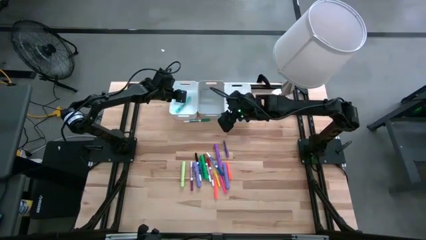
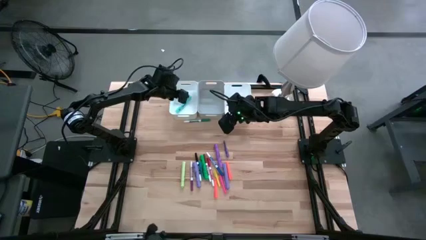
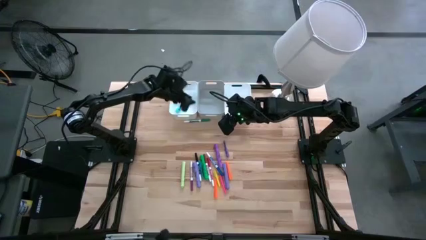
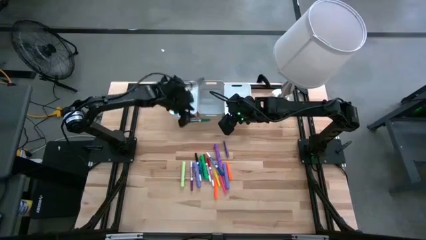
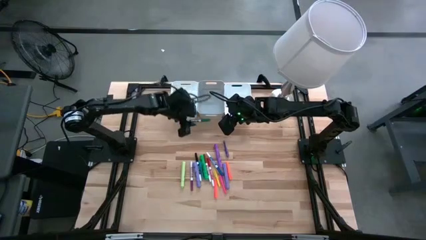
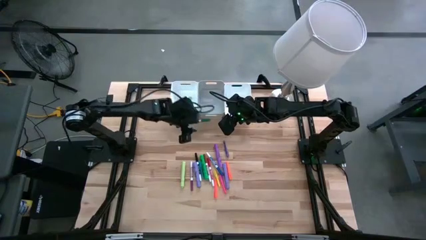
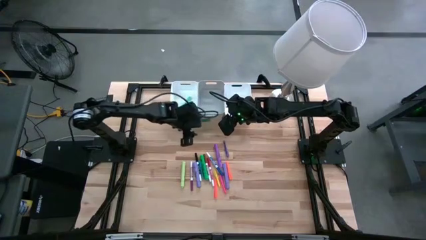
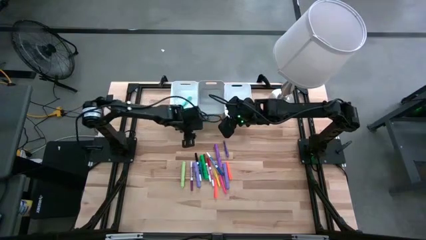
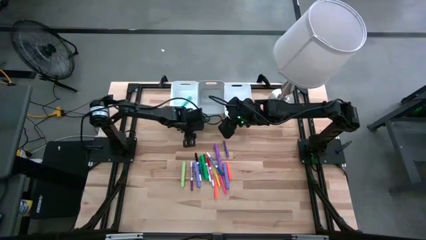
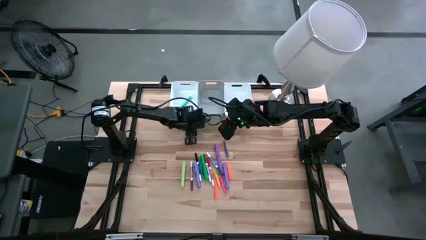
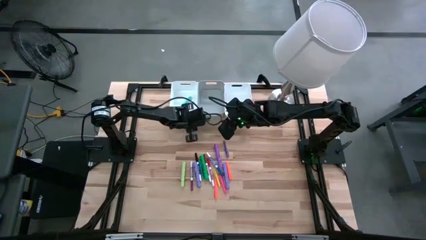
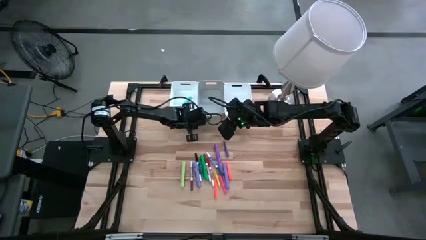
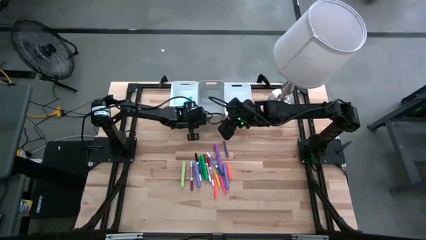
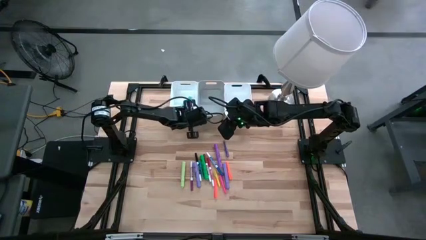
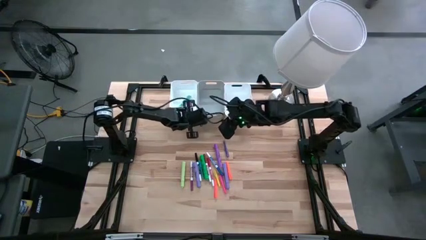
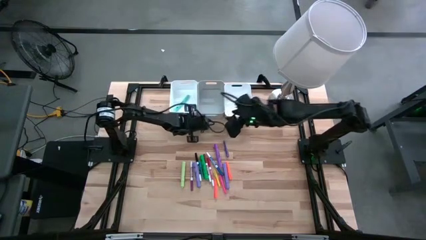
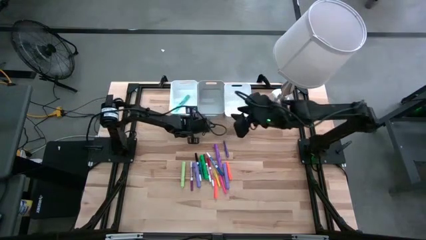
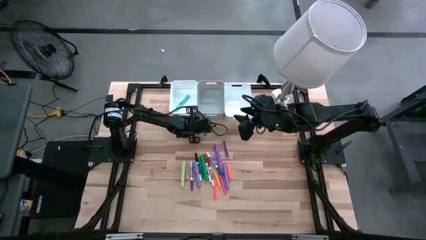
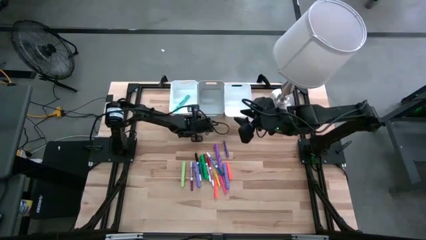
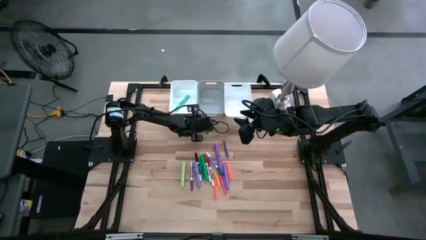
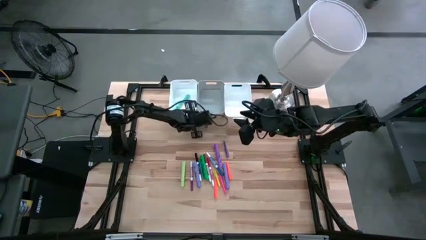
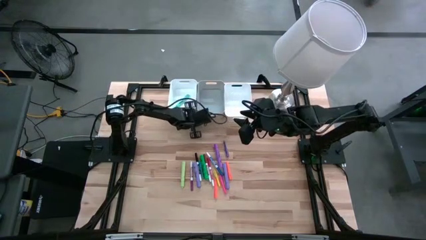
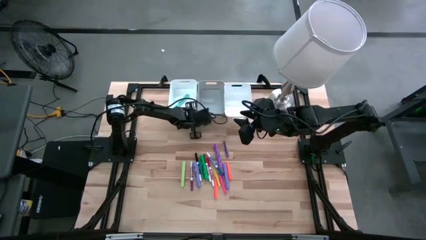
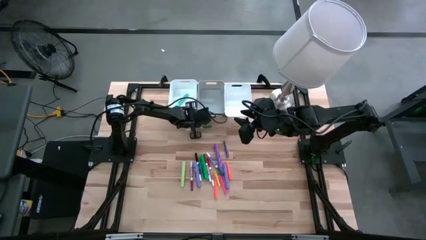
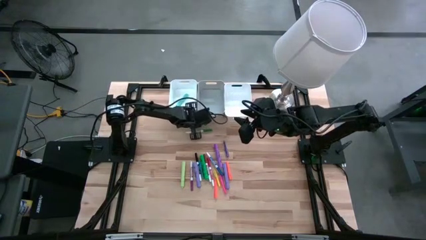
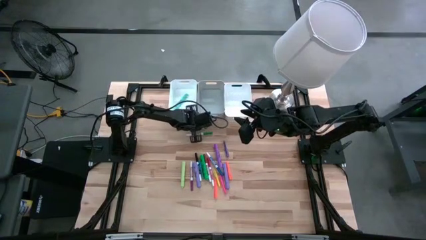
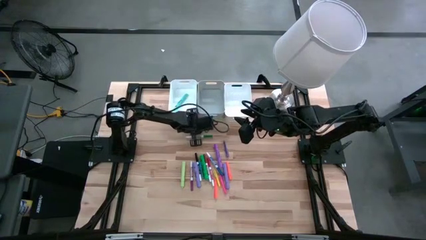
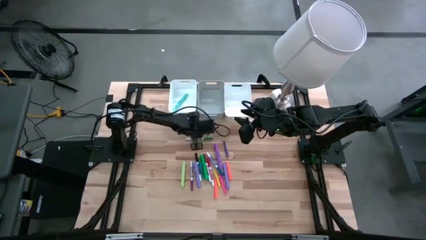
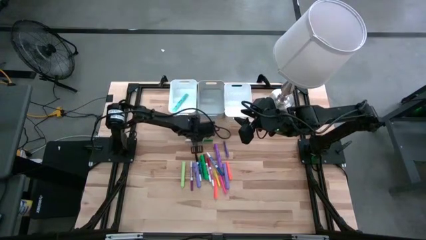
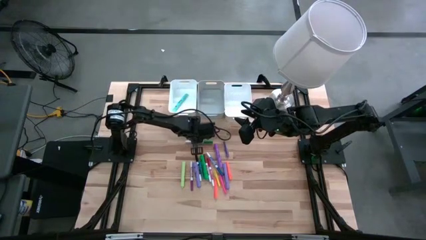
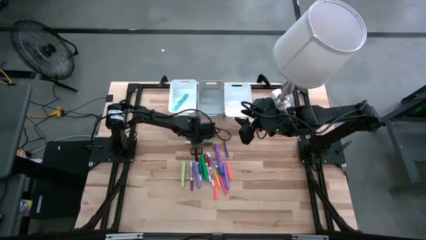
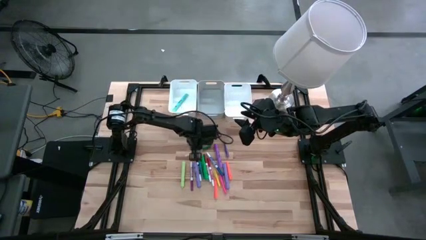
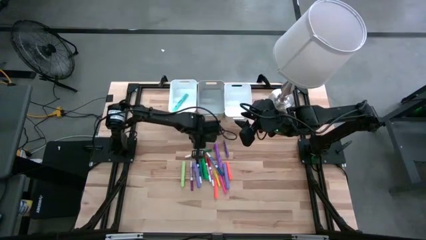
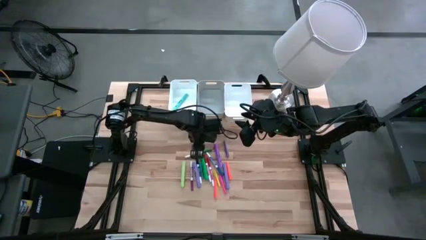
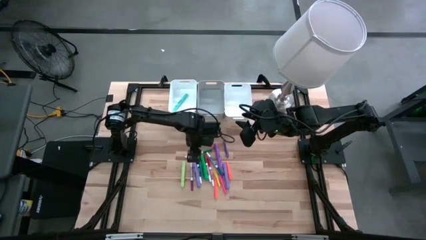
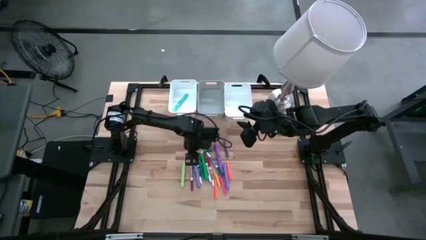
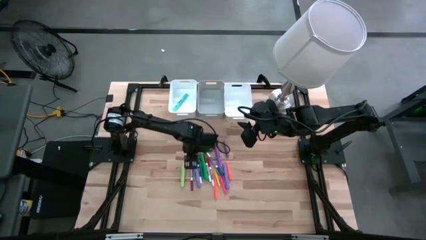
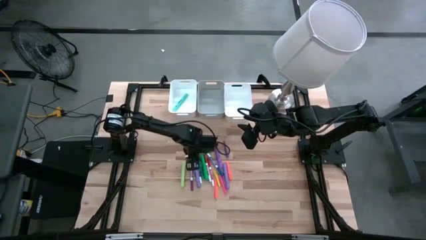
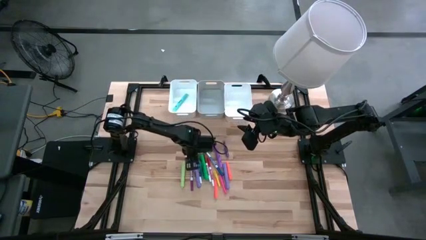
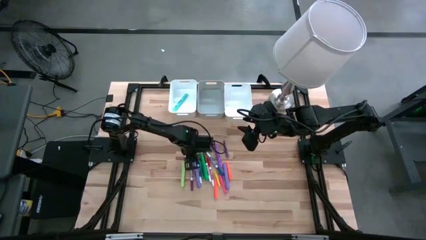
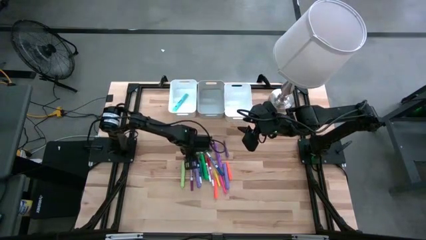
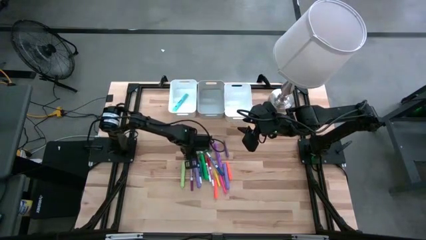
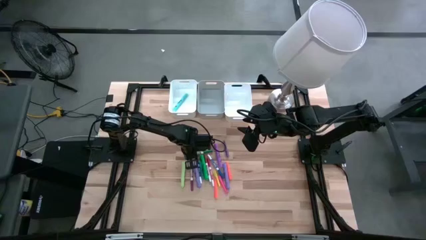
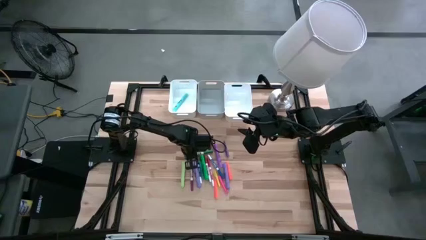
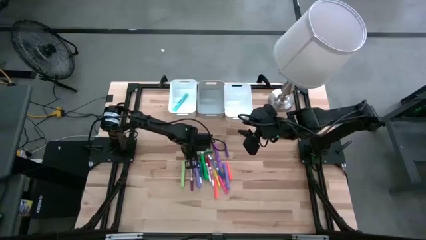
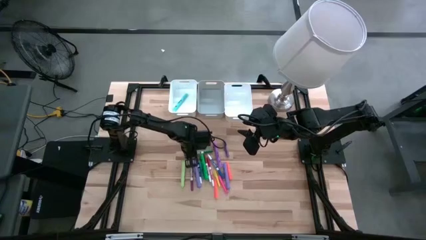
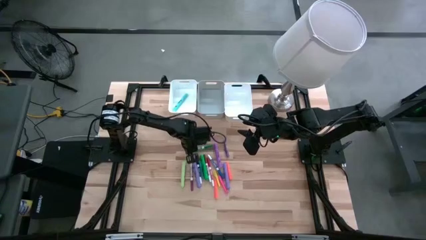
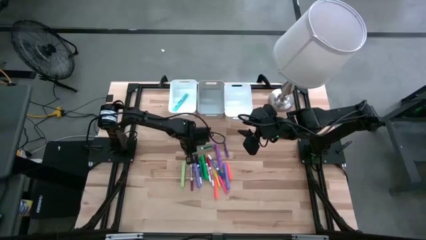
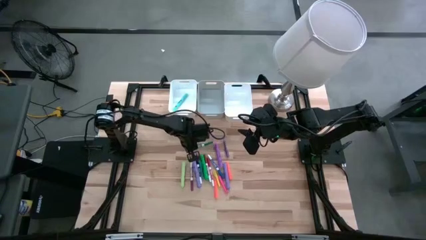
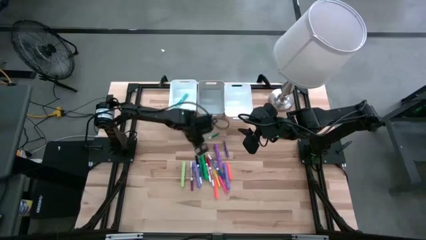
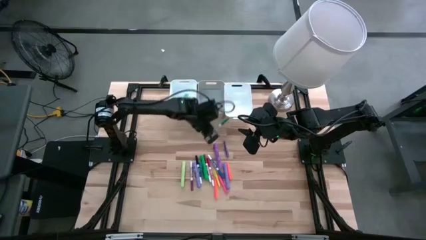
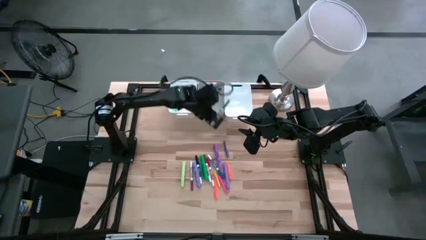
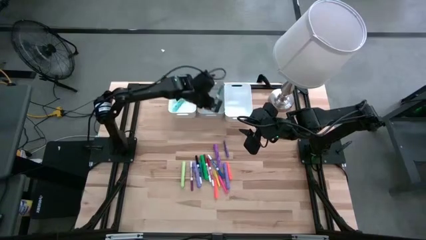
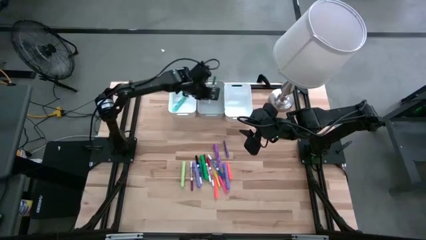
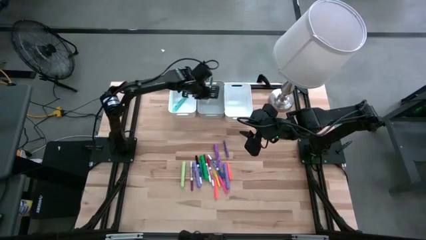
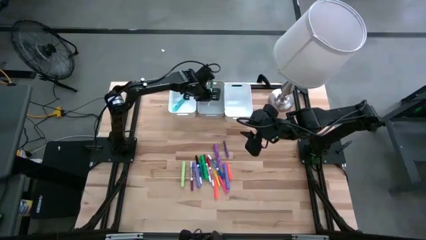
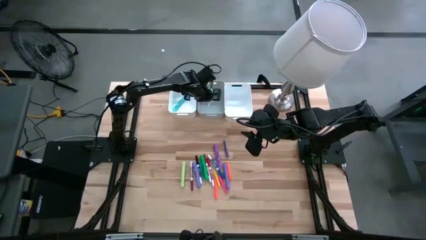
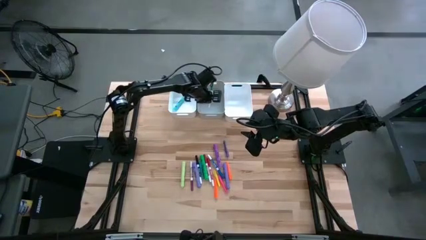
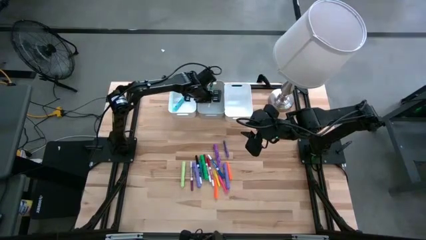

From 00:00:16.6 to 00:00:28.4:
Task: Pick & Place Markers
Put the green marker pen into the gray bin
